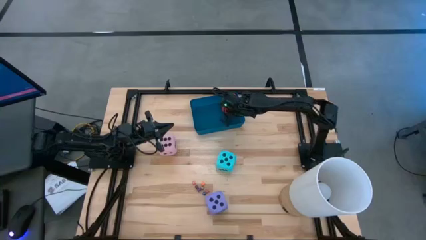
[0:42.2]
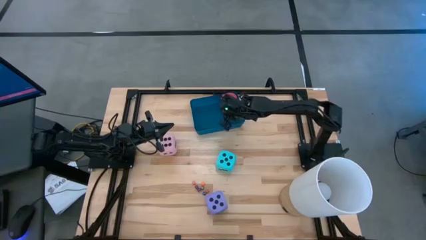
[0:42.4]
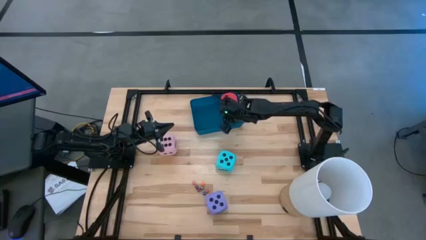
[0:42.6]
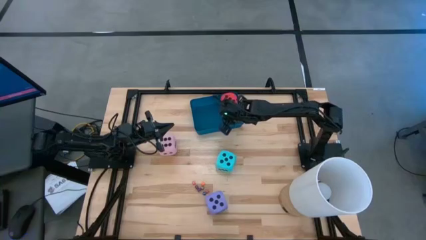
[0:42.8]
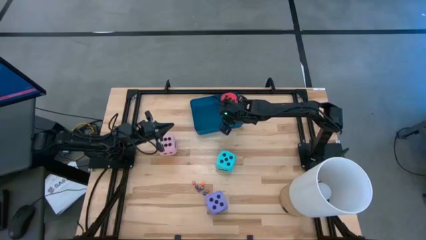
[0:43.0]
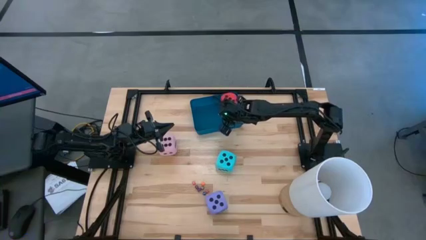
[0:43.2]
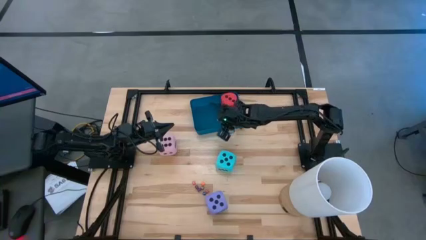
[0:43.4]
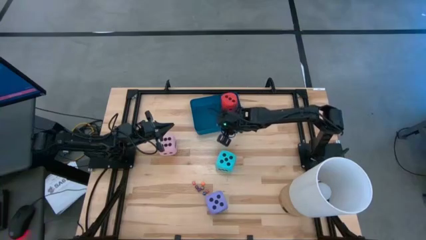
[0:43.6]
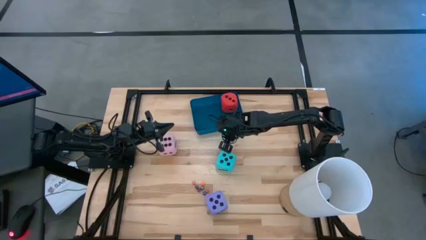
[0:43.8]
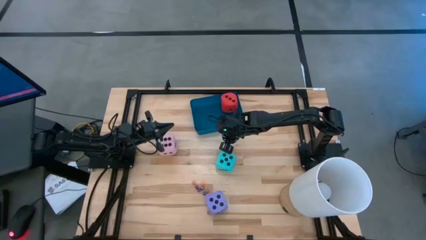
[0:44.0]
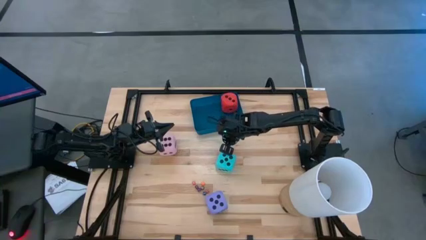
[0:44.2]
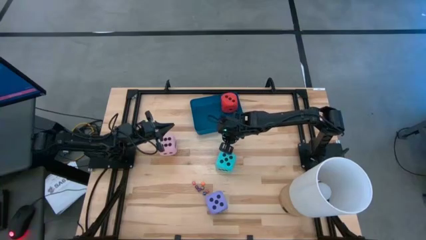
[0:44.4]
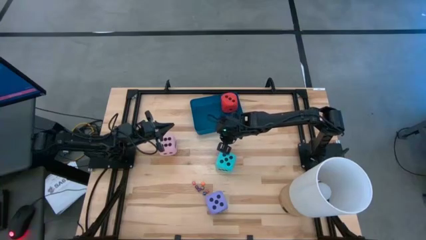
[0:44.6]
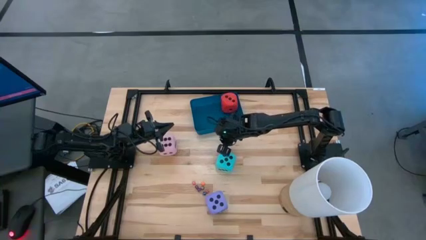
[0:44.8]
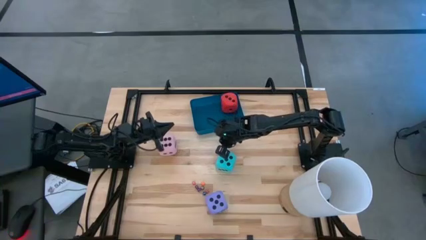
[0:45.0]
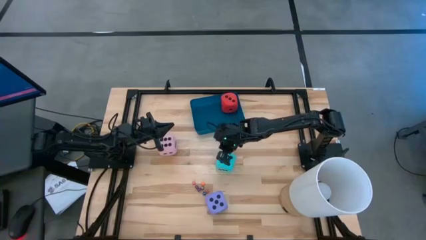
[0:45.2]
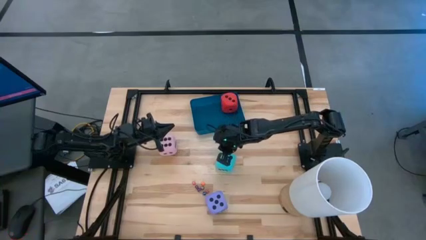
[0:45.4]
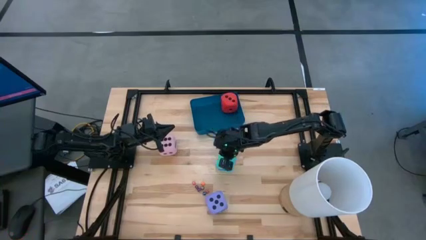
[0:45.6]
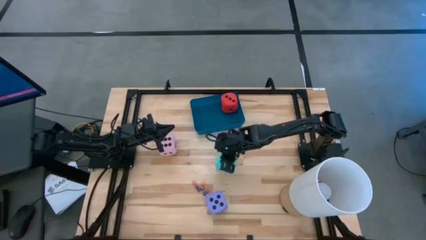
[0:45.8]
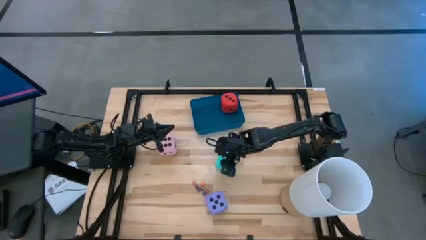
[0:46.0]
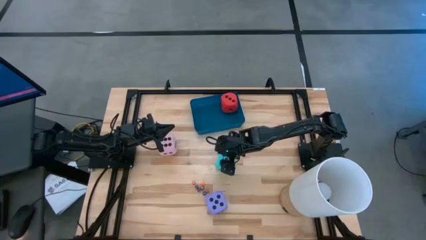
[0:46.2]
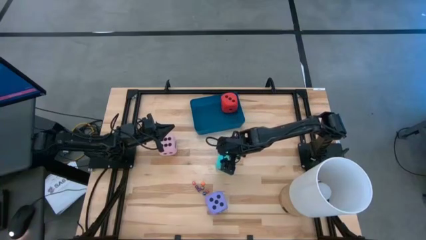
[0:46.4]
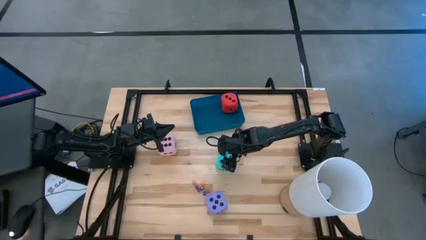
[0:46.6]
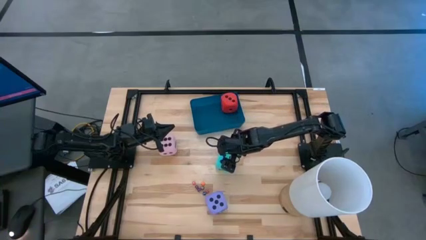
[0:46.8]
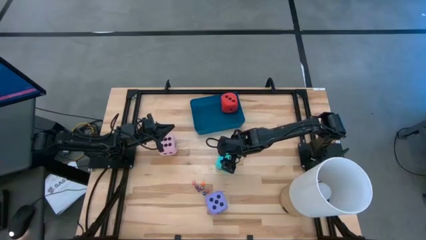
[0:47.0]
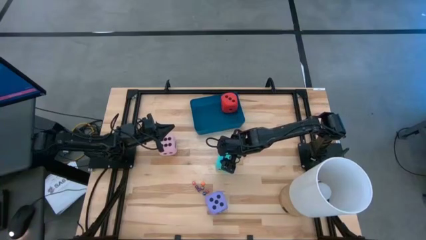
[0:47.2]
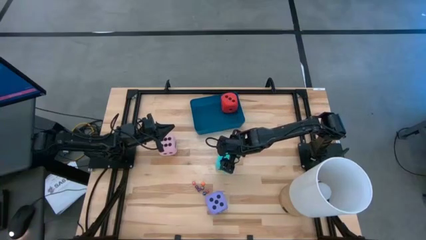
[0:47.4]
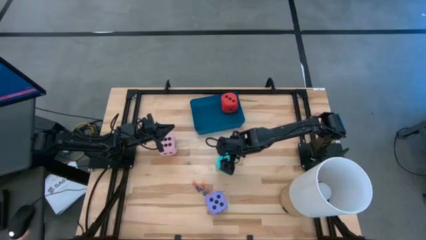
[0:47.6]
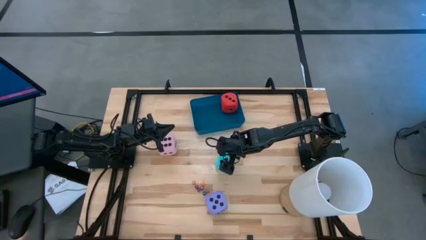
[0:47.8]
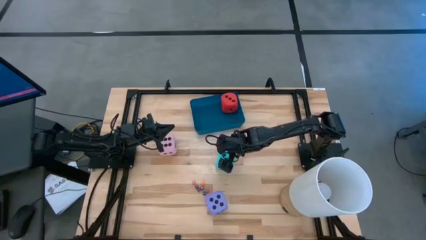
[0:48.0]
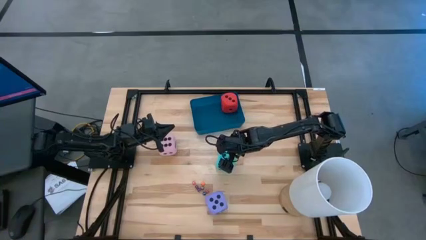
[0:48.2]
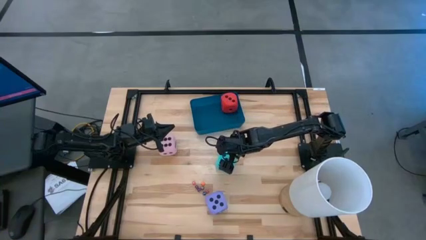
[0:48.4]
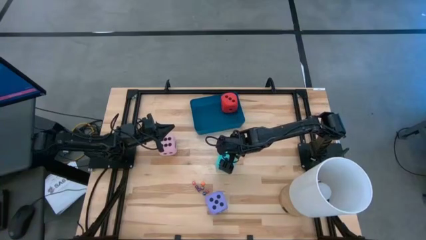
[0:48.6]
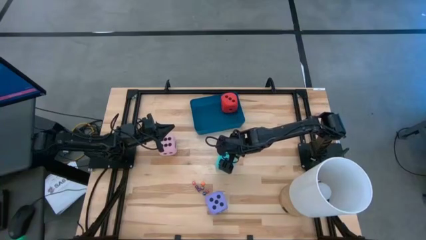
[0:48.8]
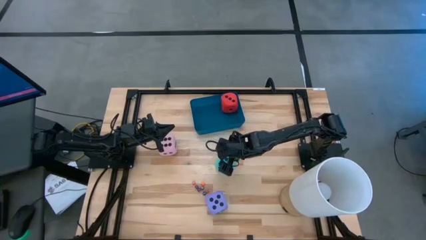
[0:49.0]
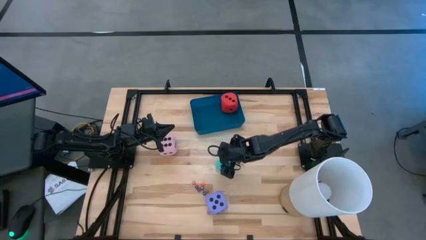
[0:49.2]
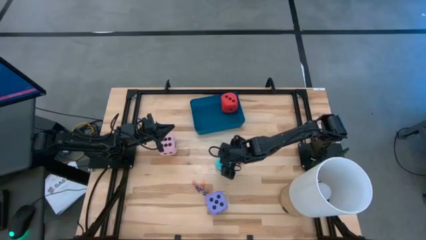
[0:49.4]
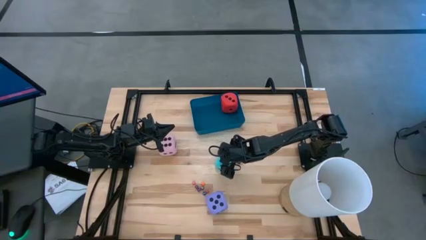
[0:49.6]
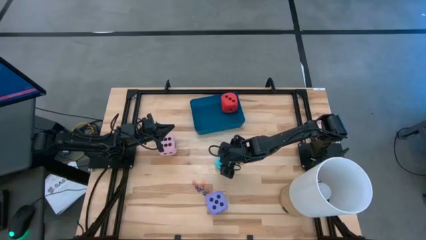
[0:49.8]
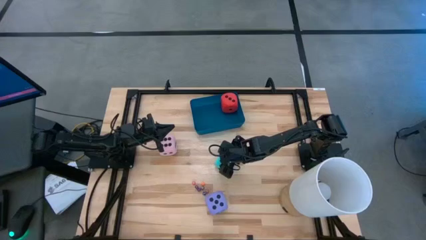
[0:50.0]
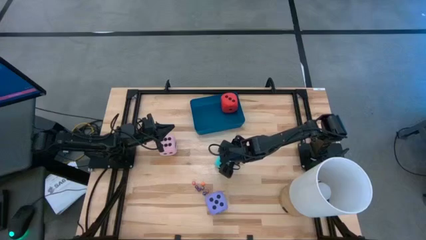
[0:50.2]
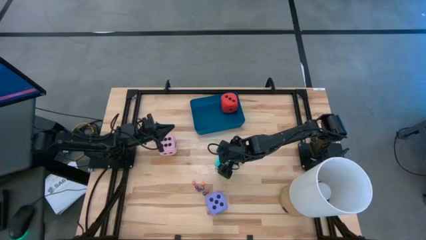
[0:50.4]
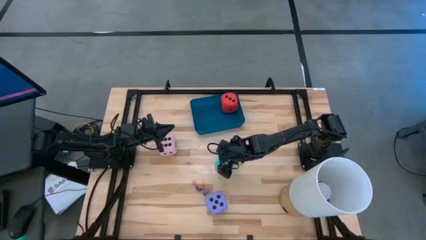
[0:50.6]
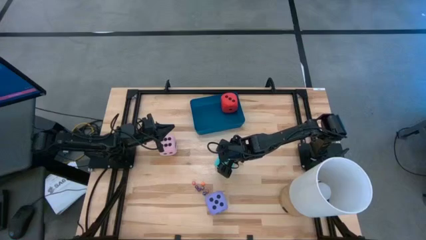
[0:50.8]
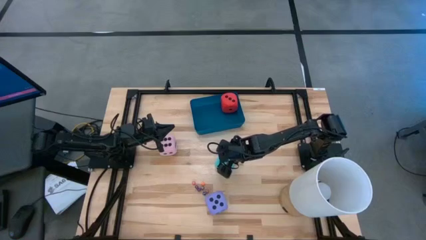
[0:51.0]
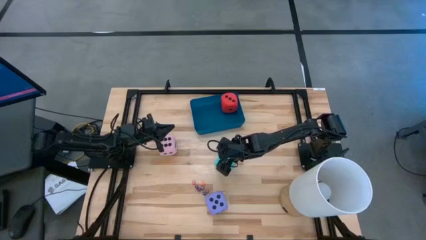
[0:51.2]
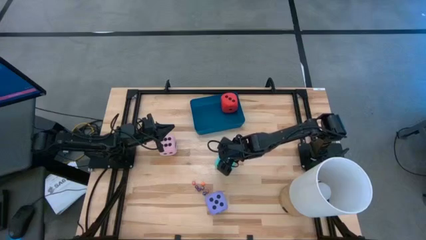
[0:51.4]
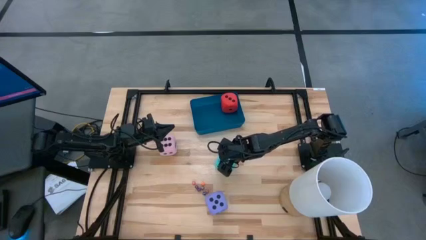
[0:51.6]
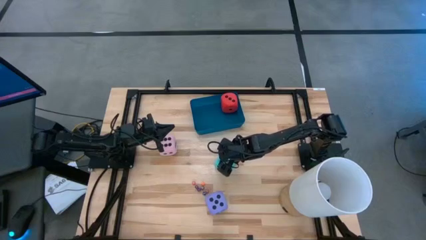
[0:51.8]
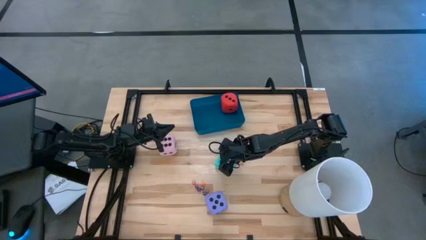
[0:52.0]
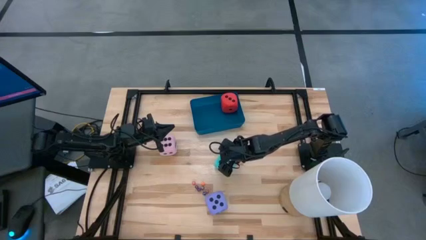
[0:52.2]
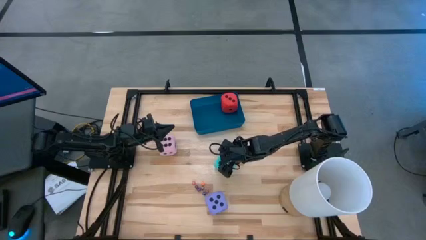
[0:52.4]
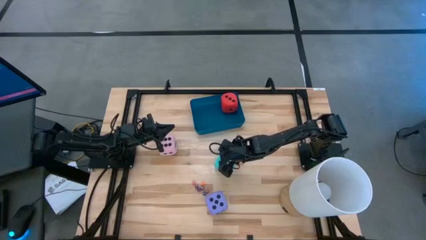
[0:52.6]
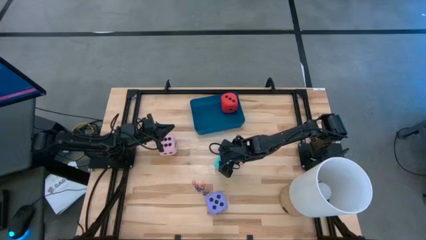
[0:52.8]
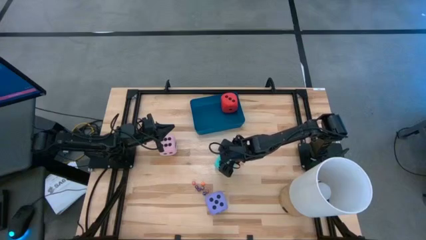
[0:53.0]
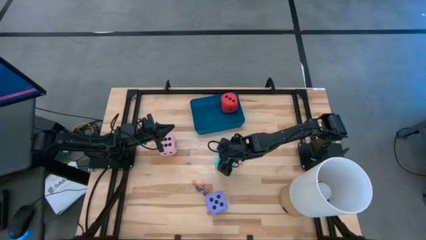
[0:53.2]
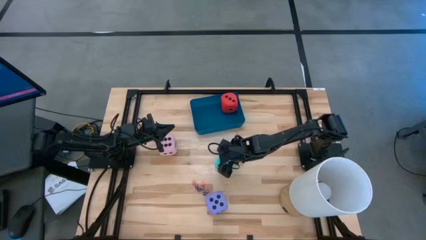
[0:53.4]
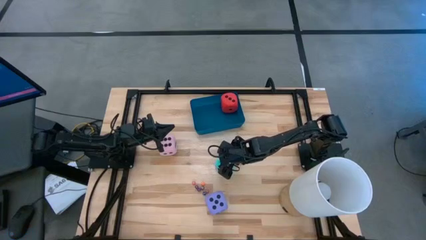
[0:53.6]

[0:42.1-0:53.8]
Task: Pick & Place Dice
Put the large blue dice into the blue bin
